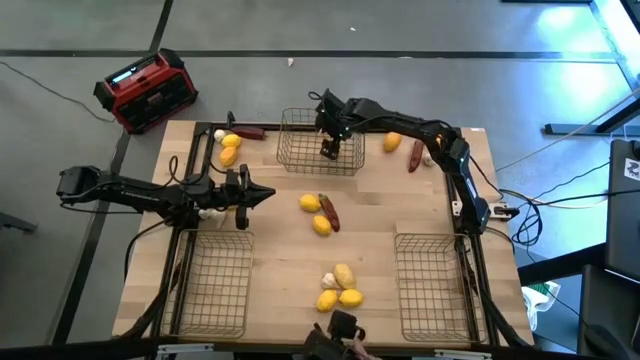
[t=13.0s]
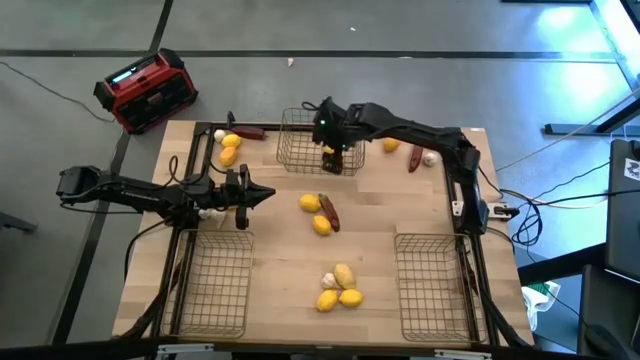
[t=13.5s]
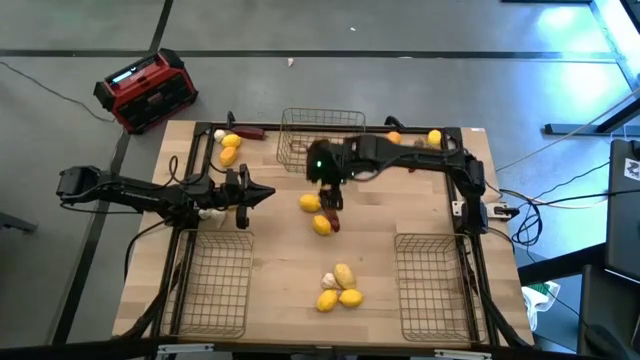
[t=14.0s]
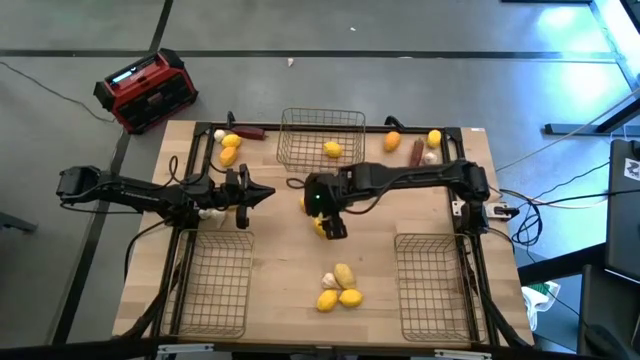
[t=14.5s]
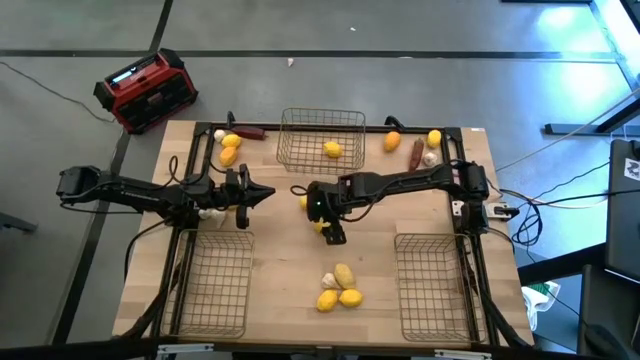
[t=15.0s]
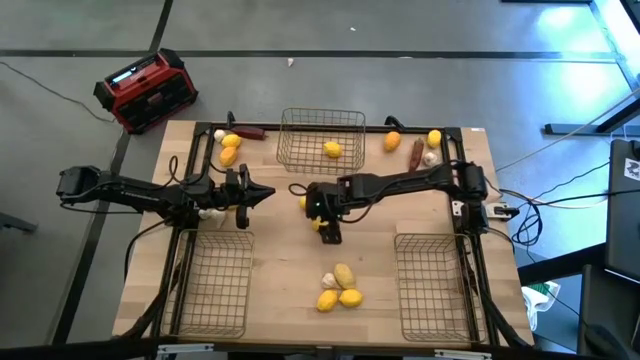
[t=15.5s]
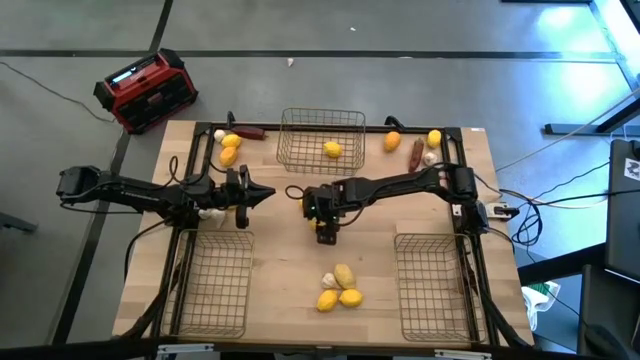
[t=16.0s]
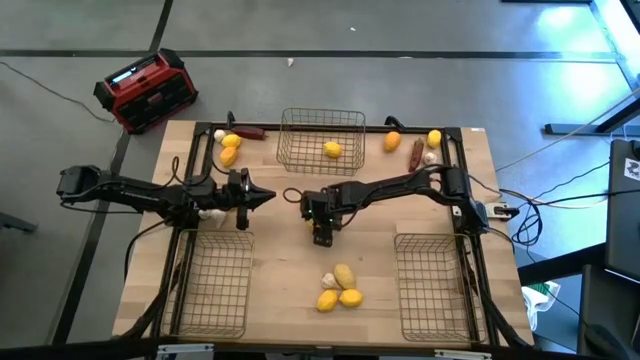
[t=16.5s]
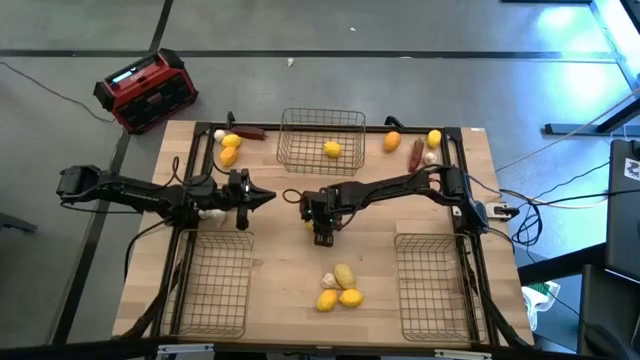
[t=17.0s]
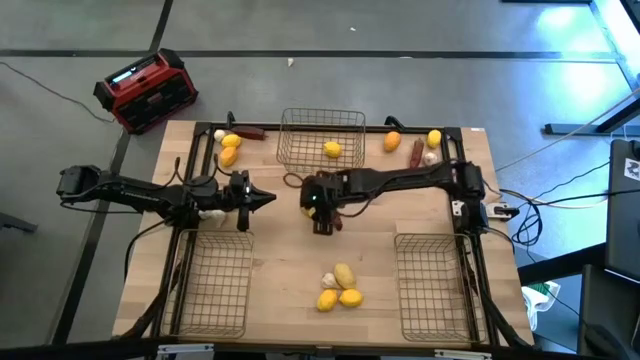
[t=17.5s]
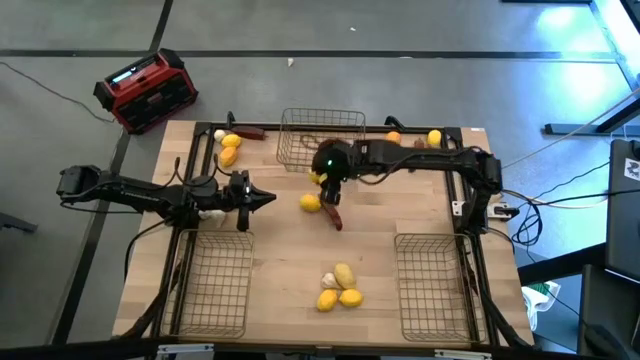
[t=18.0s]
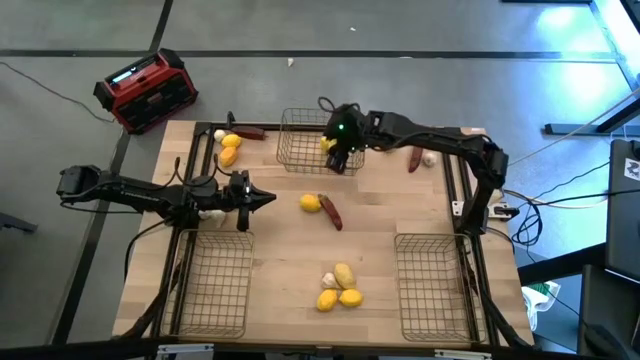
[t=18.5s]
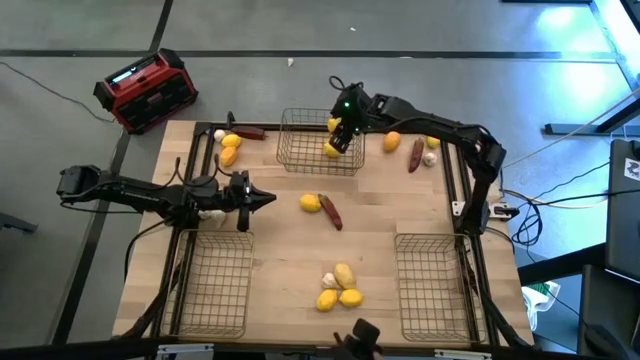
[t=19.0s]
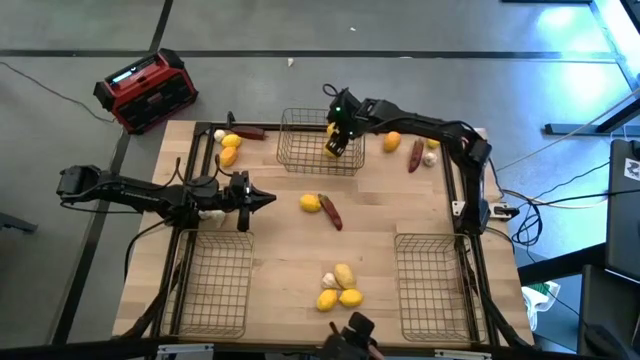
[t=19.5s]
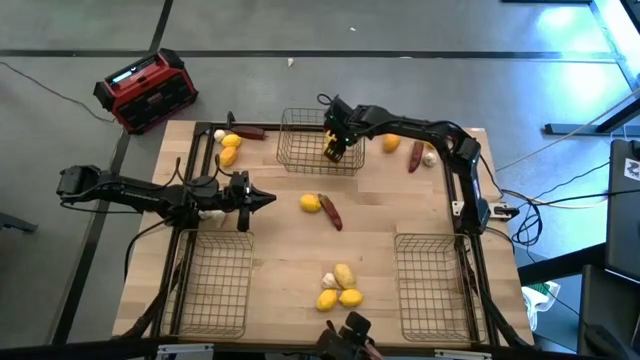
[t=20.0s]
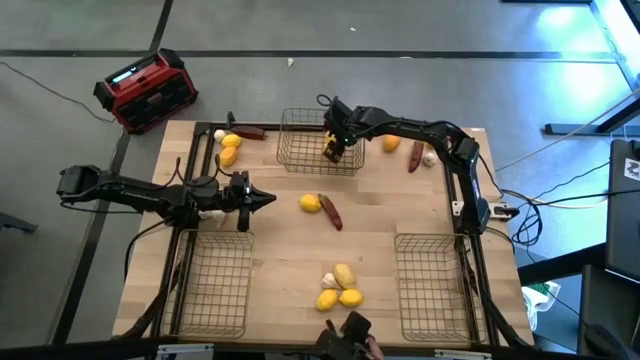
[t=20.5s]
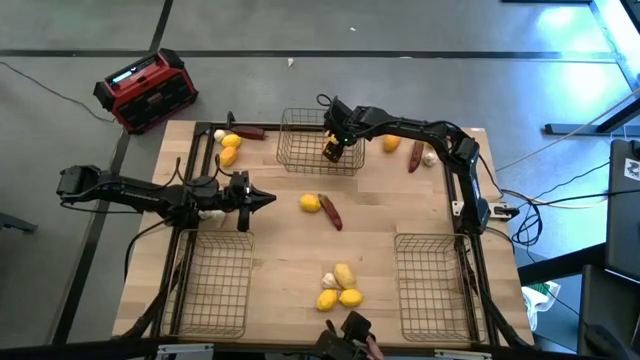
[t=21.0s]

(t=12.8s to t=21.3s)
Task: Sort produce into baskets
Put the lemon into the top wire basket

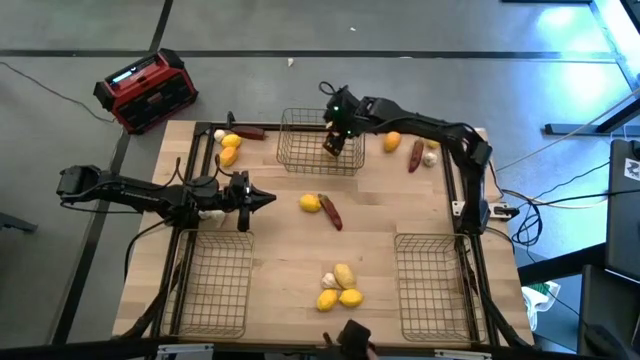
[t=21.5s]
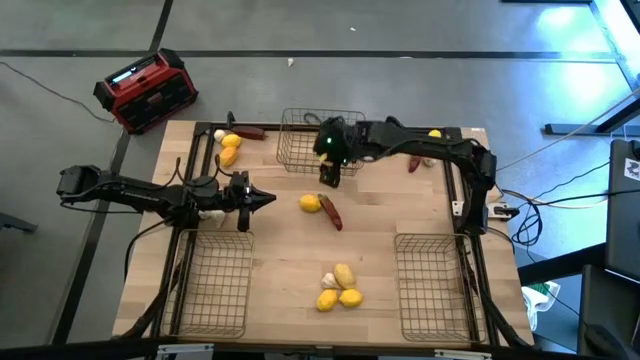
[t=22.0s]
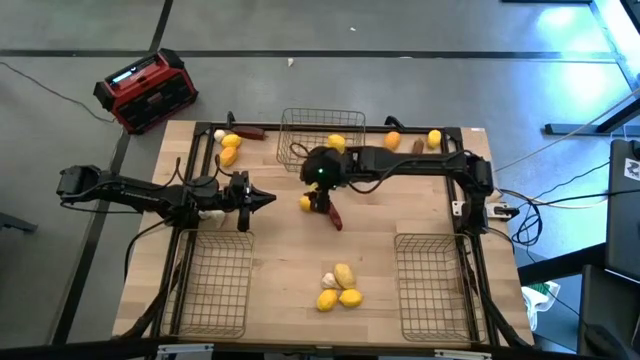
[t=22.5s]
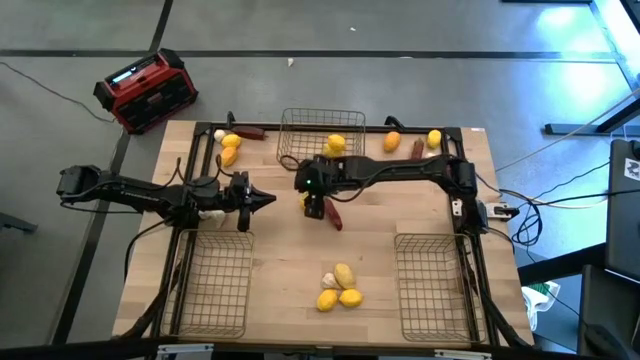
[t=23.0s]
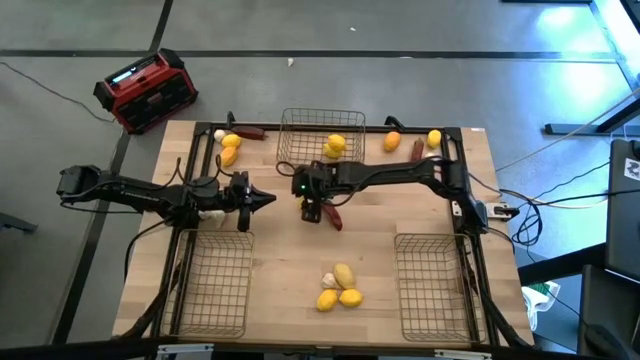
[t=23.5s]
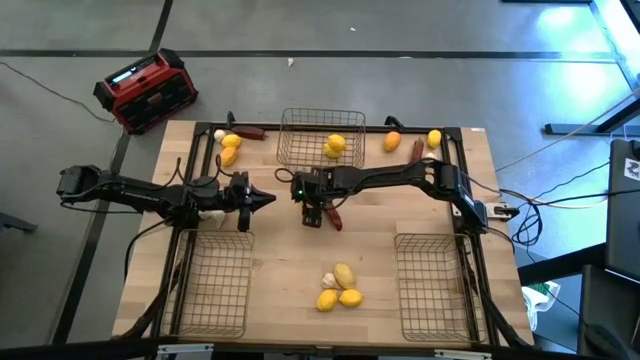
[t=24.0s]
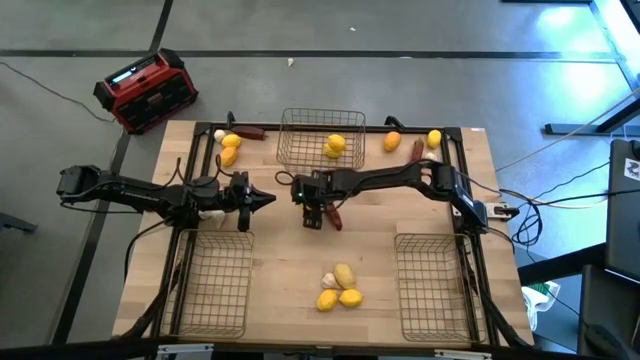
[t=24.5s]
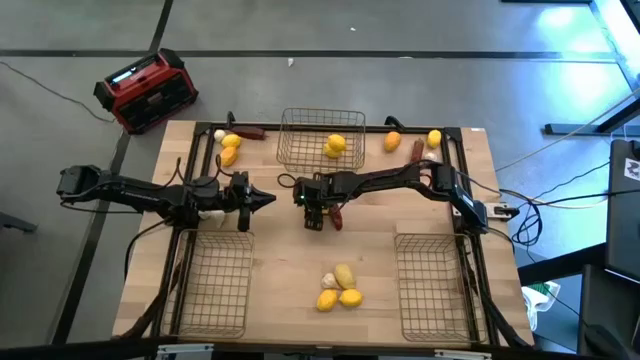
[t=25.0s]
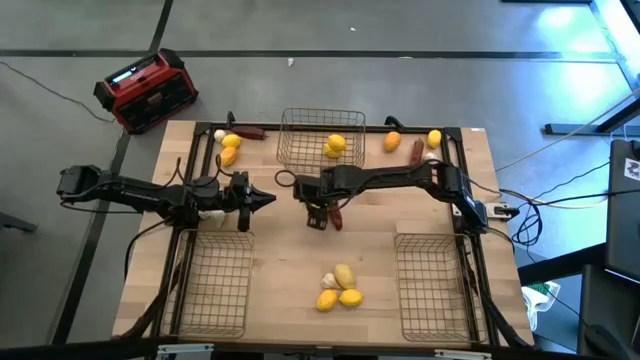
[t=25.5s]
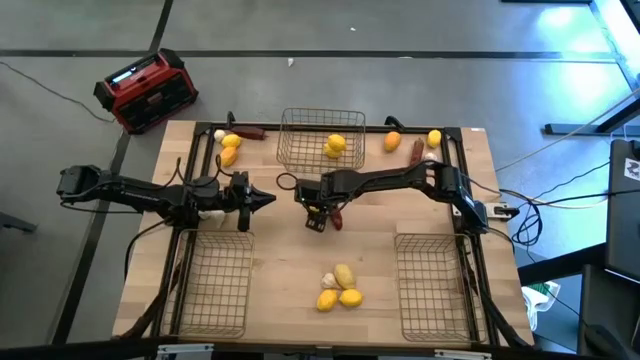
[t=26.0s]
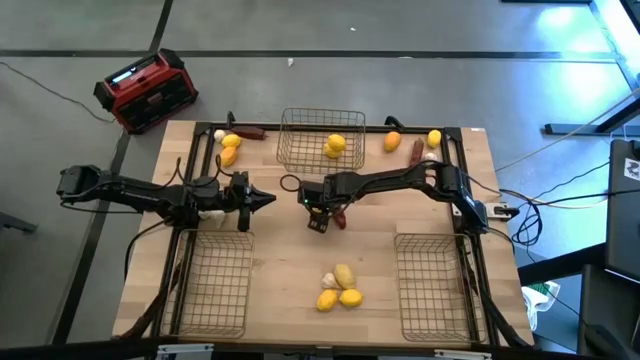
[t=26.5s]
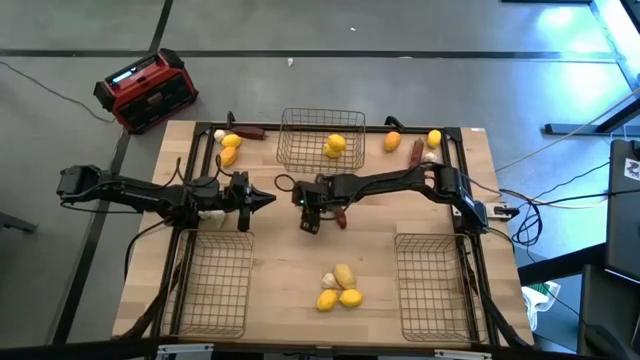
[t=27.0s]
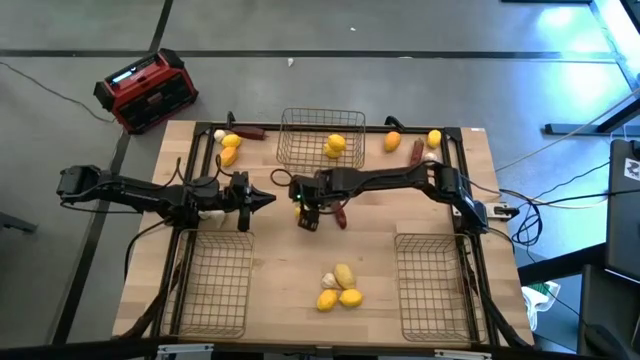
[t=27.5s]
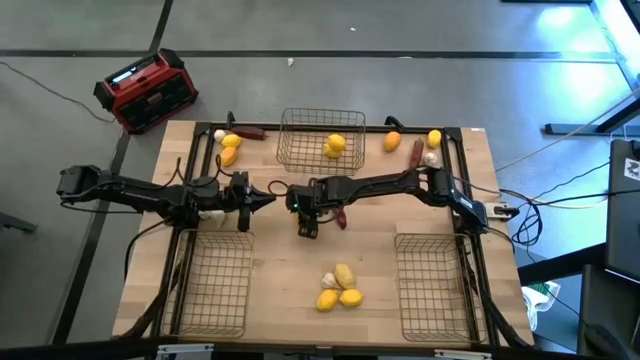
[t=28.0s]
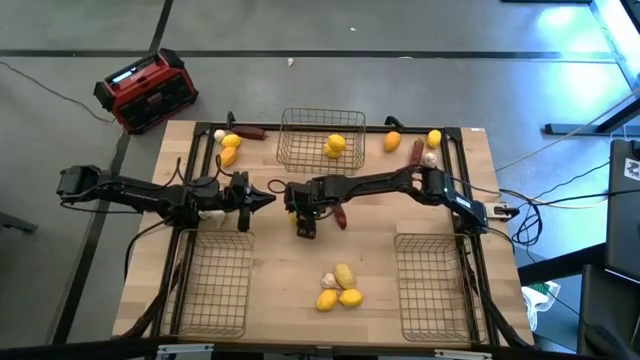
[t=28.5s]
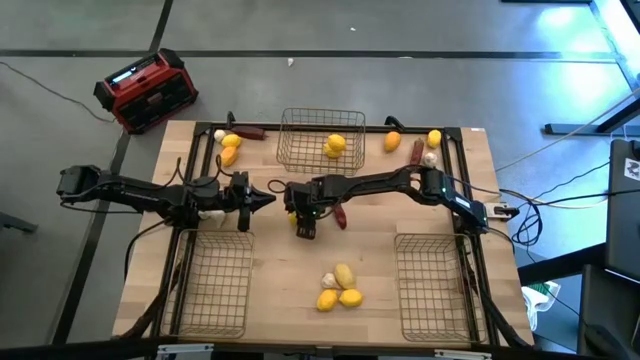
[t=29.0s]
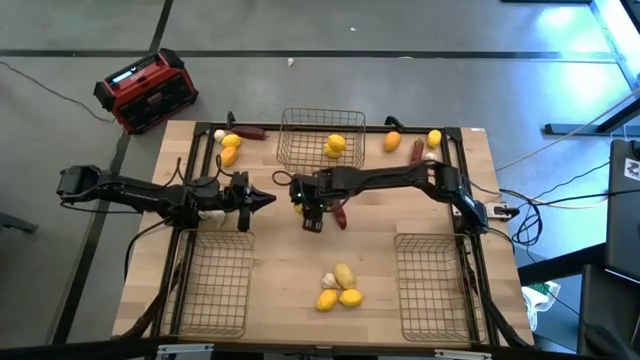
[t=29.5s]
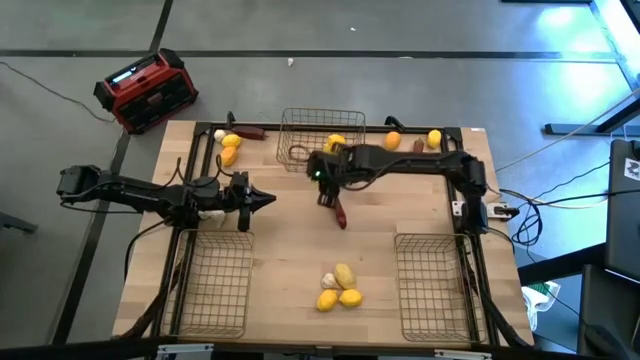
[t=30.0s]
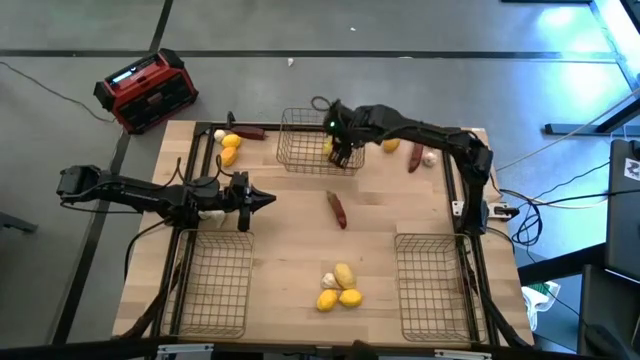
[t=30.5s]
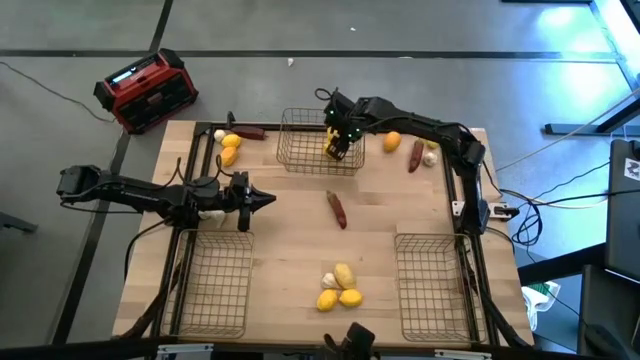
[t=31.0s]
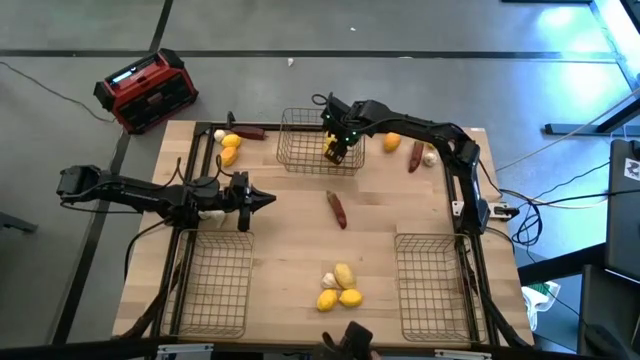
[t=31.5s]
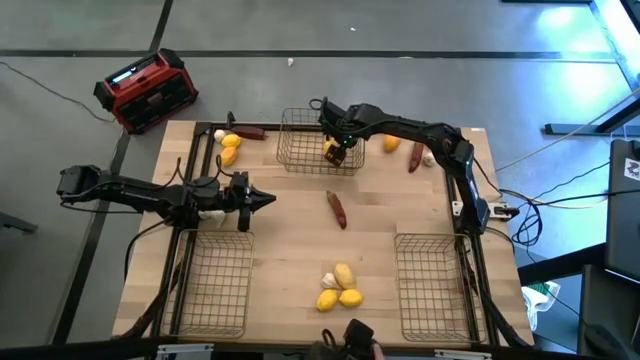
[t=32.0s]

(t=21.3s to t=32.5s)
Put the lemon into the top wire basket
